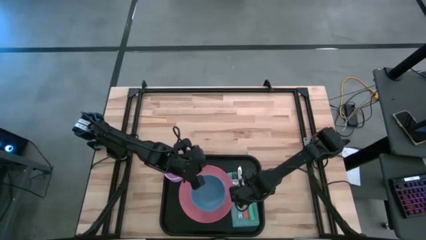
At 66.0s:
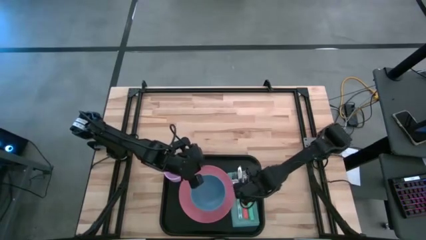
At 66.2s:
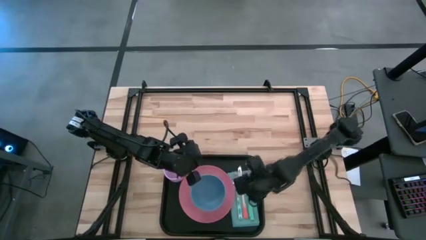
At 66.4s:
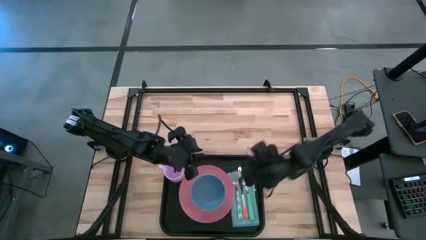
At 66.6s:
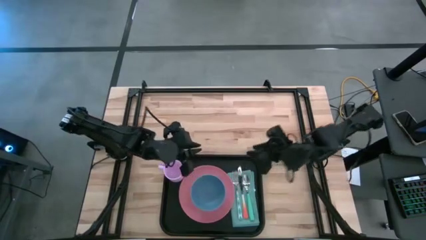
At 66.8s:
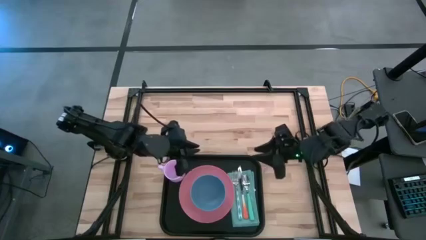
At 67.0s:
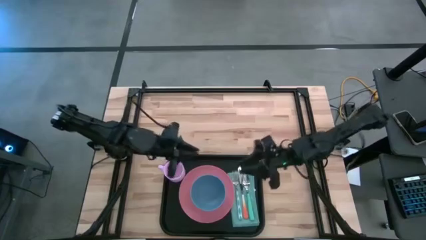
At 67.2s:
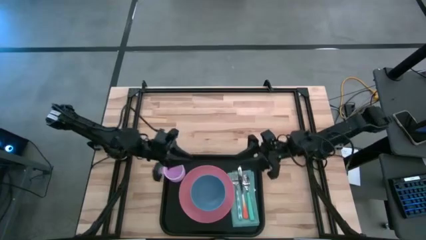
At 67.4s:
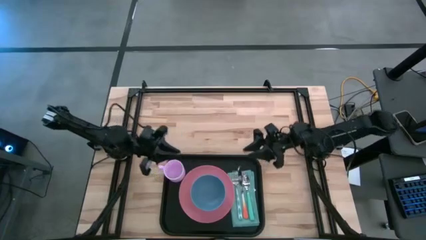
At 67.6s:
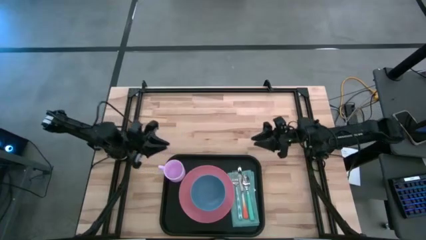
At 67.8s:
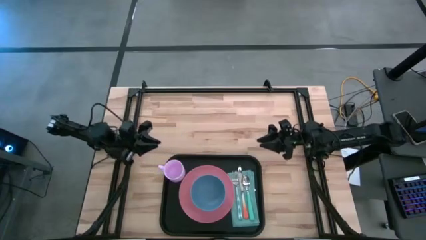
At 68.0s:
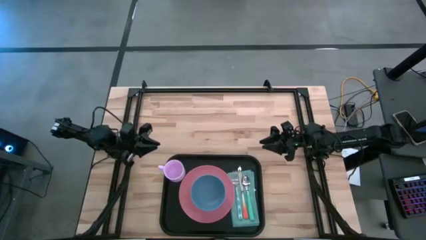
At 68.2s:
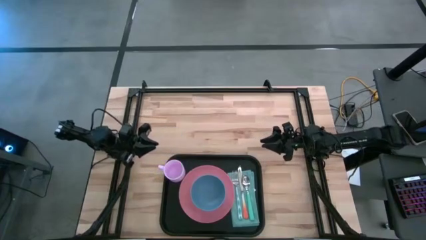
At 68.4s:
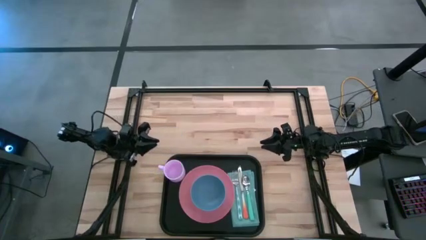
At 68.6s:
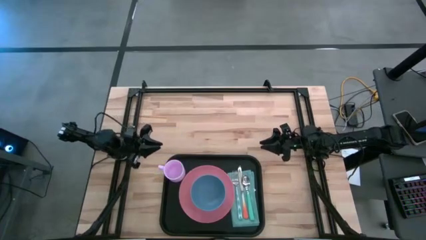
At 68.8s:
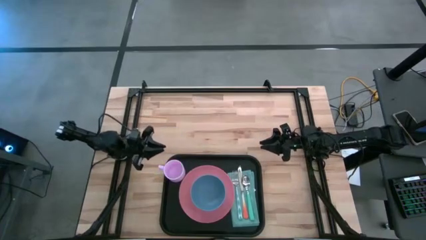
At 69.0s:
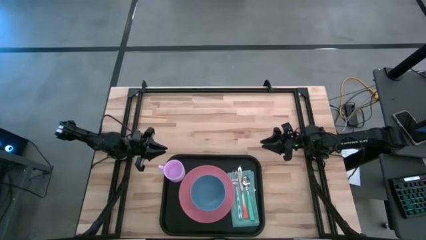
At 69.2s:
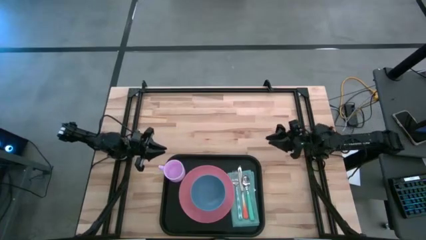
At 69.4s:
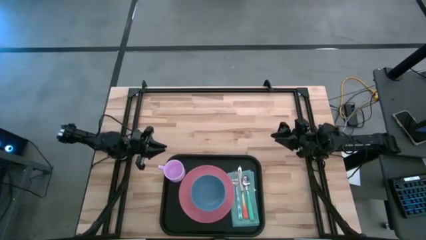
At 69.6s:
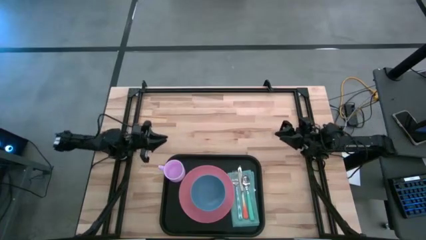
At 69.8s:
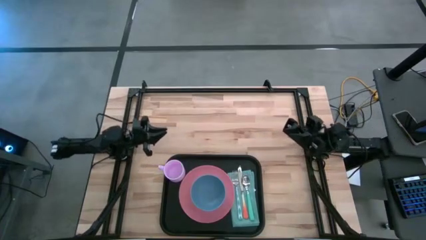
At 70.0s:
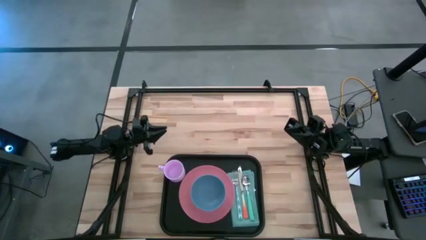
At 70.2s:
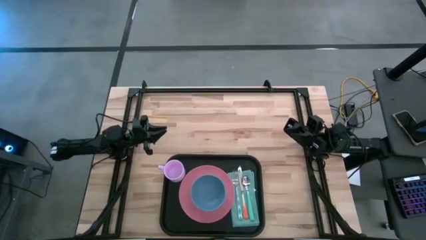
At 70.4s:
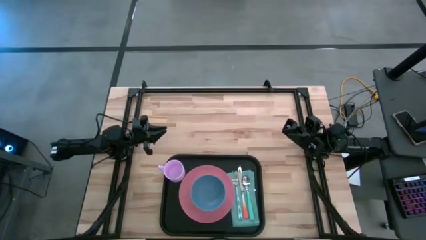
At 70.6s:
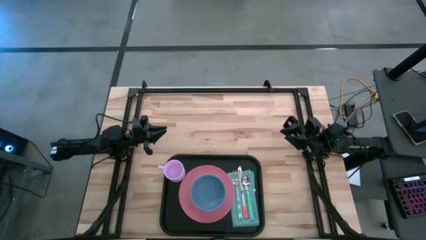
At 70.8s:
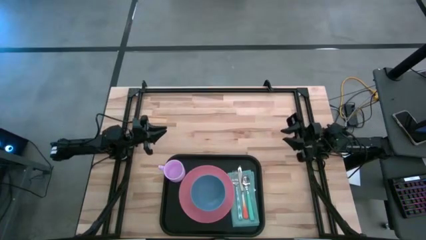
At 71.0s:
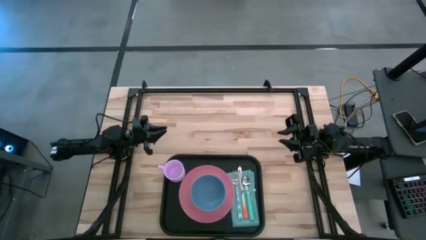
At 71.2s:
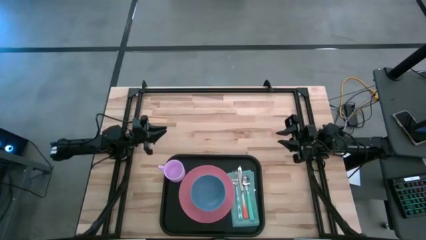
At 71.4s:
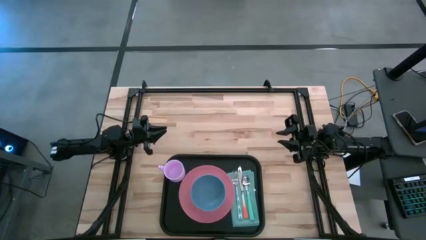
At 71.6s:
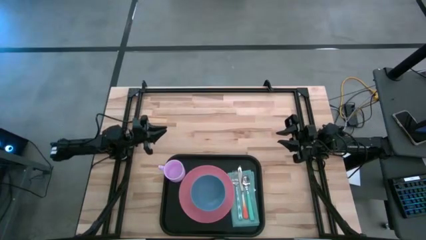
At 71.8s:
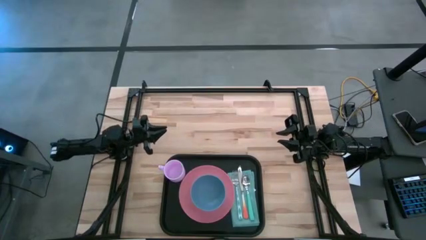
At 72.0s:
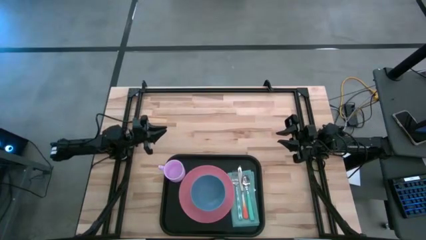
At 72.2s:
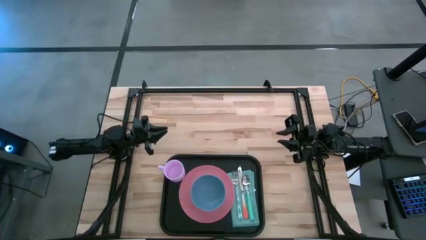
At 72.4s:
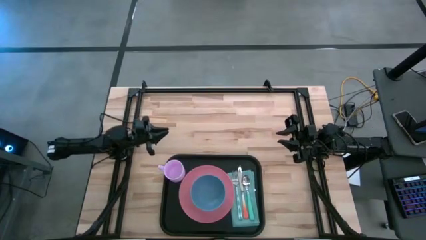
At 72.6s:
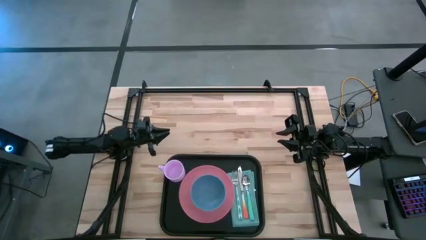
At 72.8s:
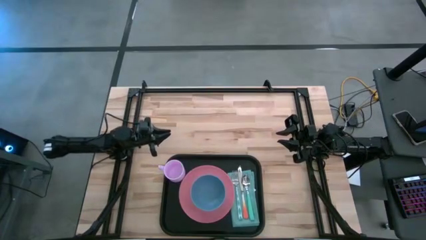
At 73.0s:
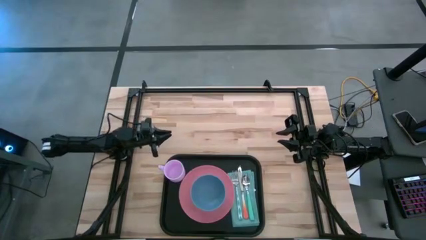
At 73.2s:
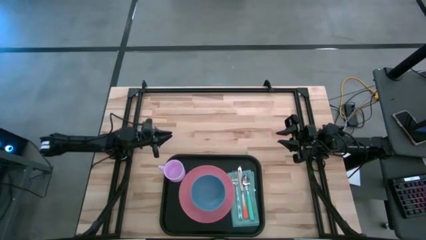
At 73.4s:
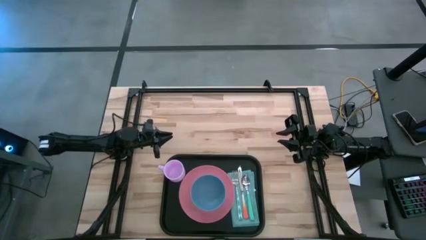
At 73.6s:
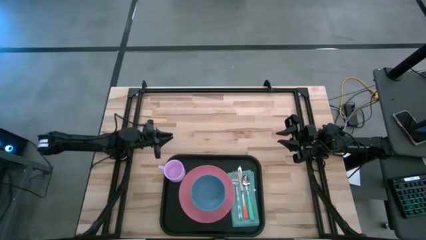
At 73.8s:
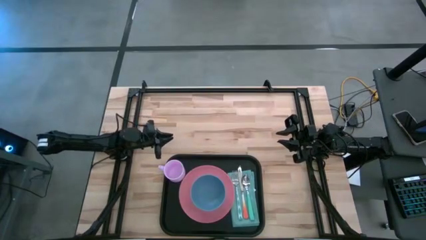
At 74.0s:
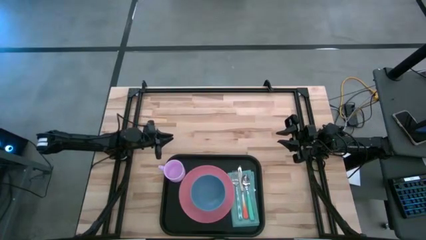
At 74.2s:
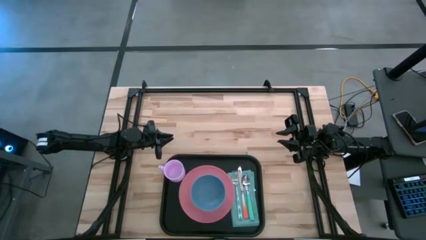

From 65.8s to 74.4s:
Task: Set up tray
Return to Home Position

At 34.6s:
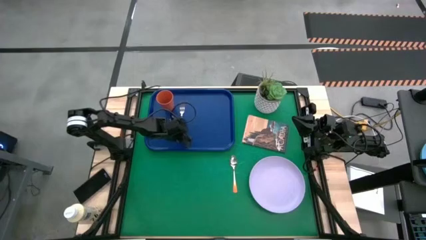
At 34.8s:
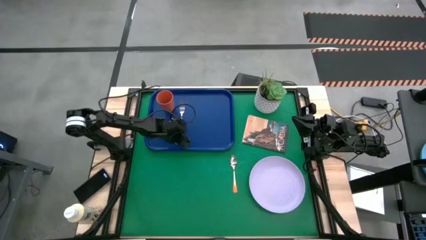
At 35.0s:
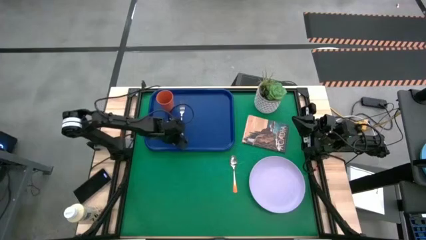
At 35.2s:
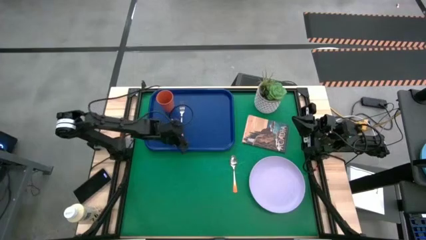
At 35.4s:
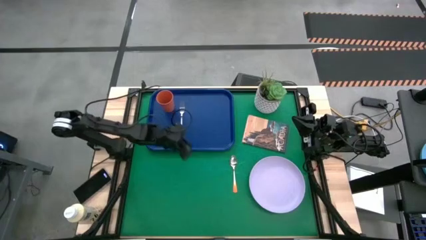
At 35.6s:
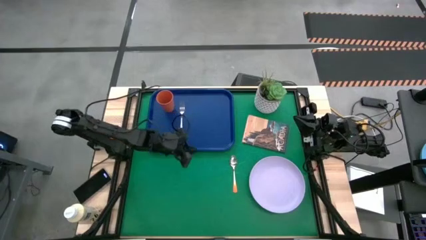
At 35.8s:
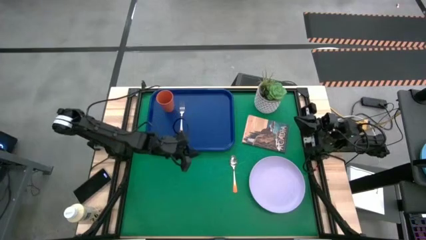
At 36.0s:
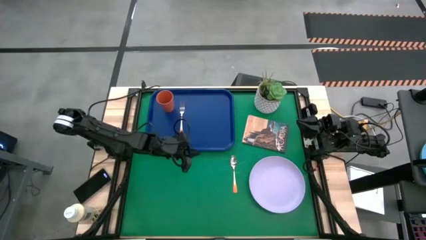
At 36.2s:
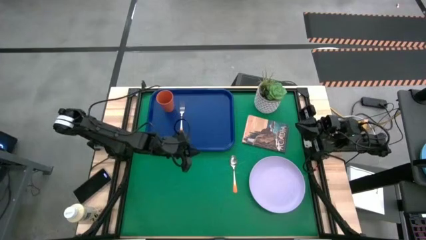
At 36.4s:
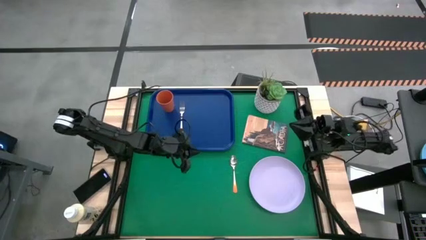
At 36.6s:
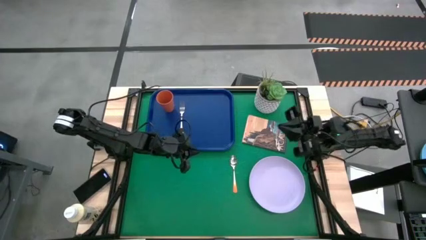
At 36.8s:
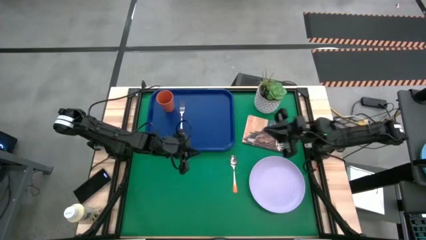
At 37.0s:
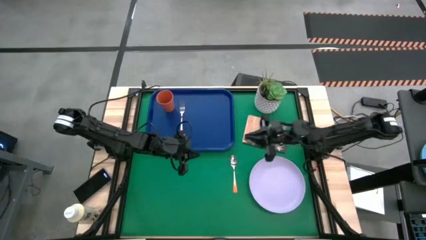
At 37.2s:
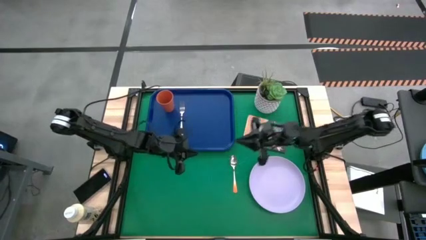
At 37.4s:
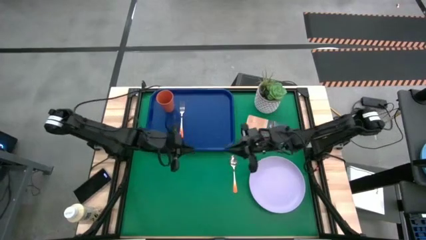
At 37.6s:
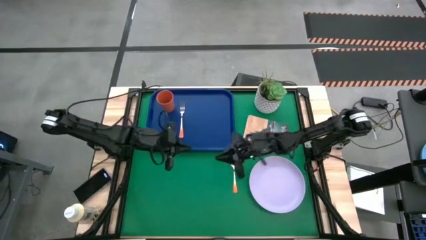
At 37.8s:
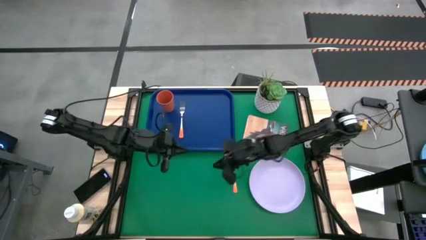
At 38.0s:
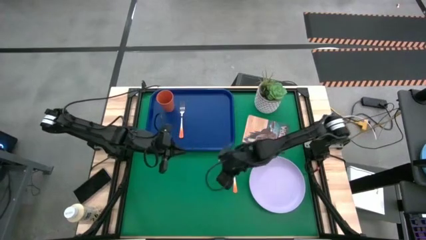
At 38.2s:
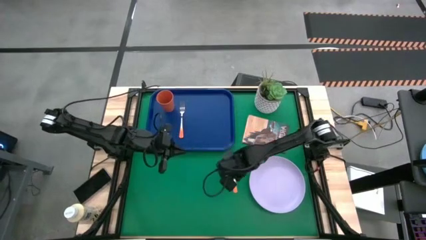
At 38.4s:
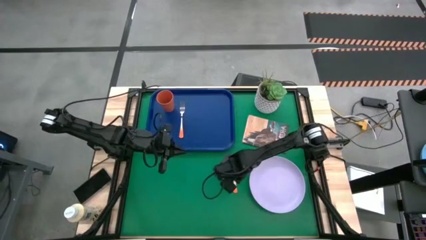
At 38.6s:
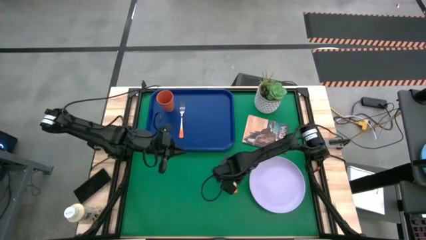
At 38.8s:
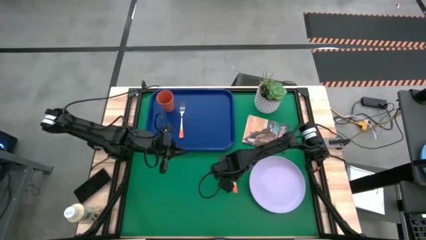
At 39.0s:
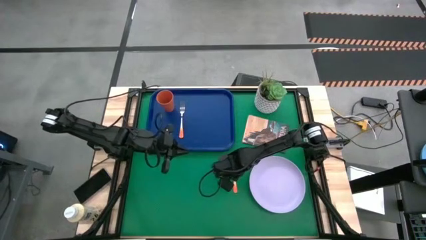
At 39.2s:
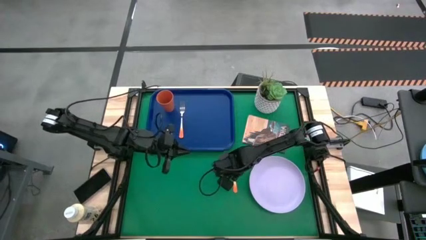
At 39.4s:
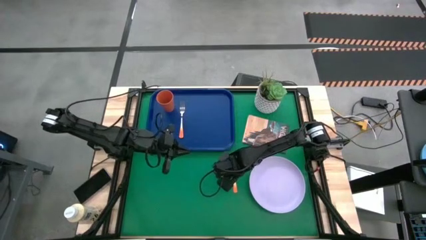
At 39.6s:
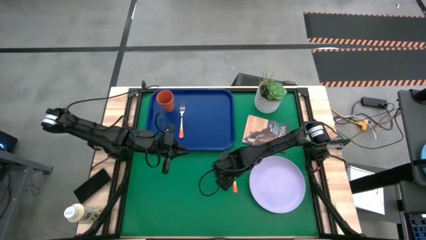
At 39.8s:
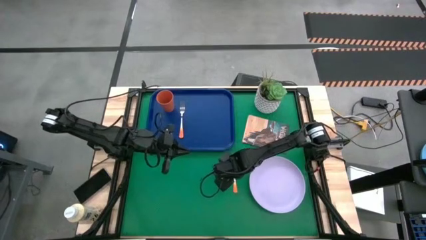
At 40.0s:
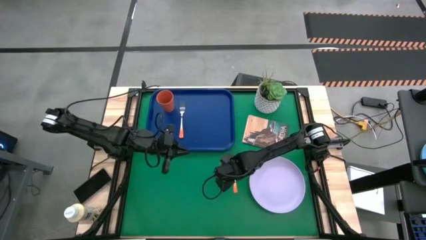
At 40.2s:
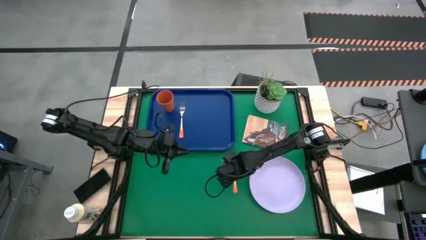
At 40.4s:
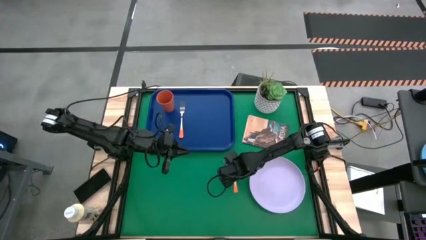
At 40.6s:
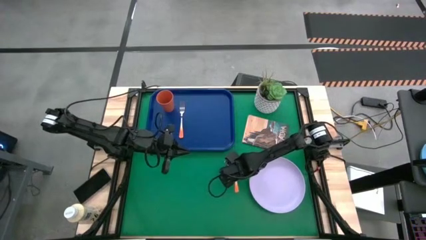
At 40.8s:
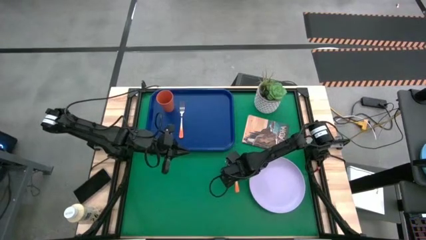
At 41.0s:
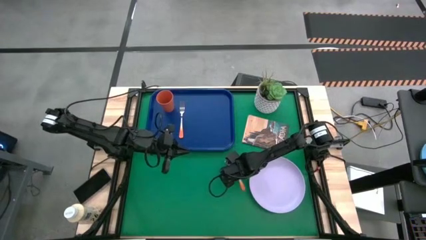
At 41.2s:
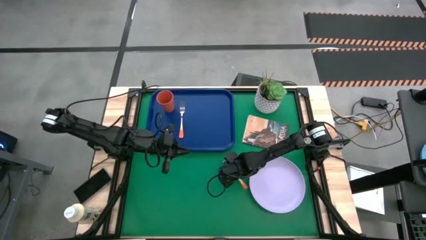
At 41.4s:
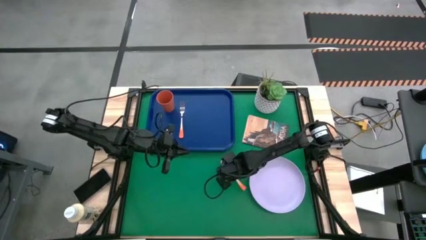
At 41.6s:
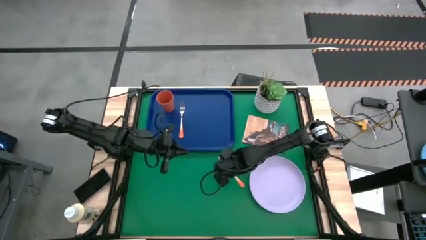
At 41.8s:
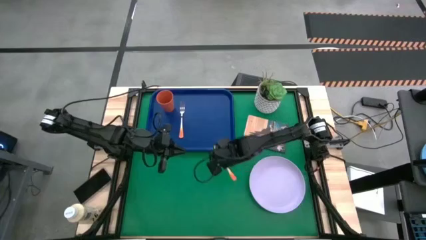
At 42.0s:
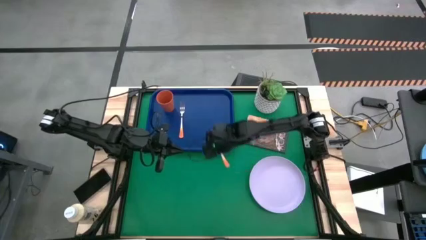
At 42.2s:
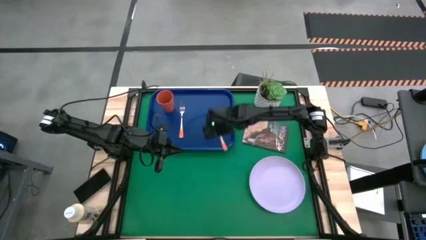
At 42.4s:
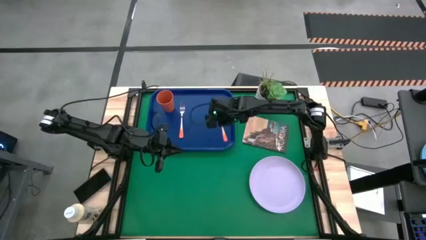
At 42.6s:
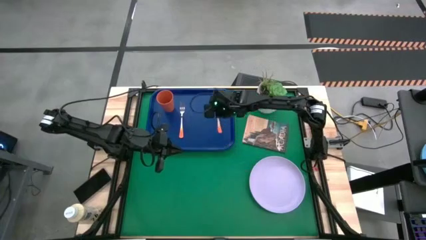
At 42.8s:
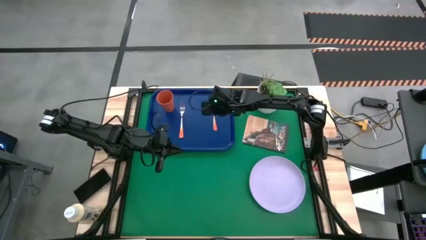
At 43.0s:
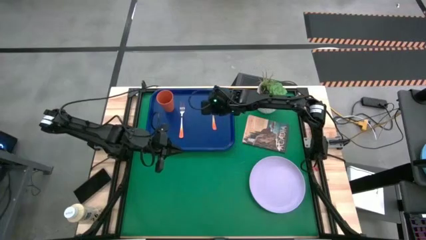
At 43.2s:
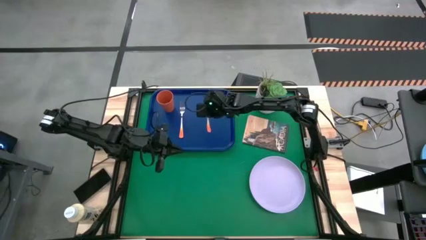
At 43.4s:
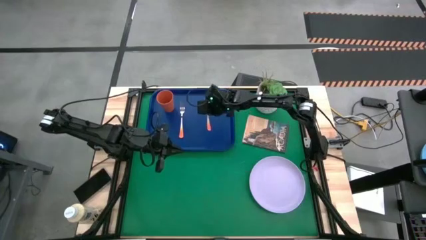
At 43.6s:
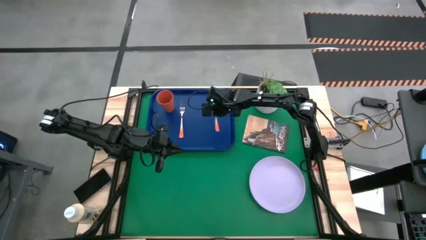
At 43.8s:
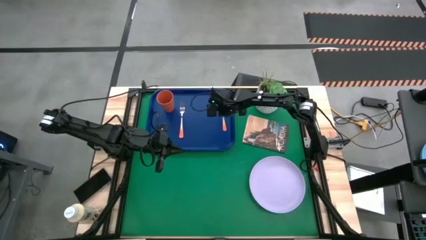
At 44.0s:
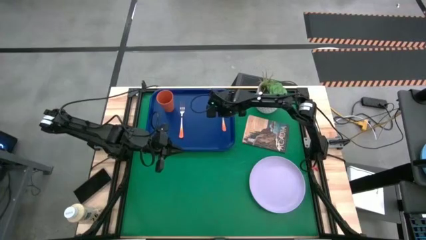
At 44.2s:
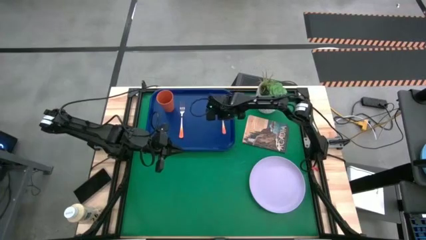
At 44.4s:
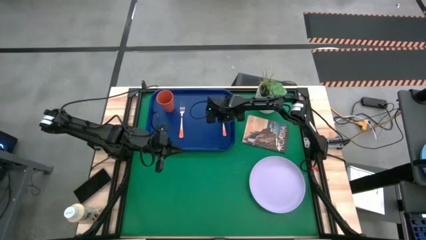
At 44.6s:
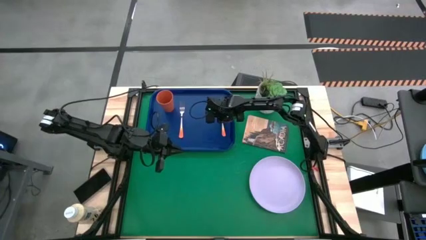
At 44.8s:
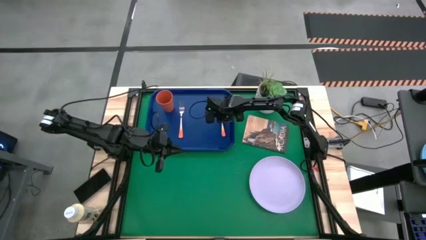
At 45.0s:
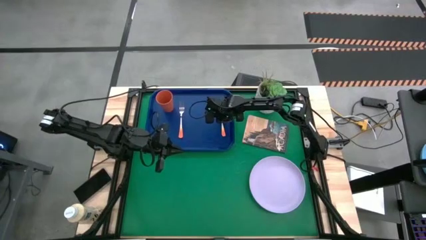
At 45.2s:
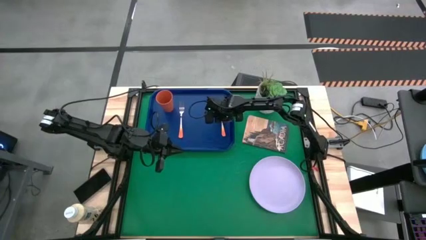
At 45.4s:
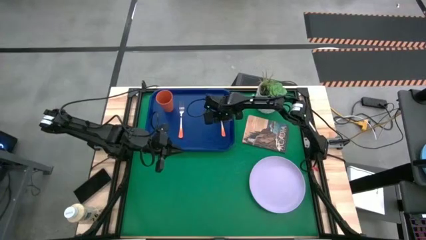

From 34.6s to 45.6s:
Task: Pick and place plate/cup/fork/spoon on tray
Put the orange spoon on the blue tray to the right side of the orange fork
